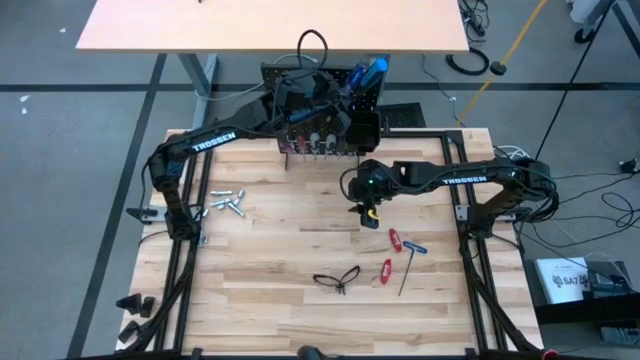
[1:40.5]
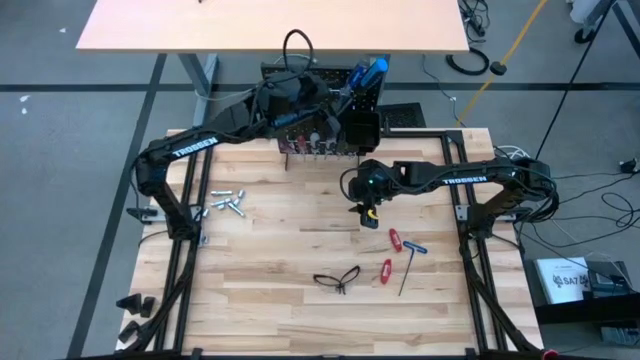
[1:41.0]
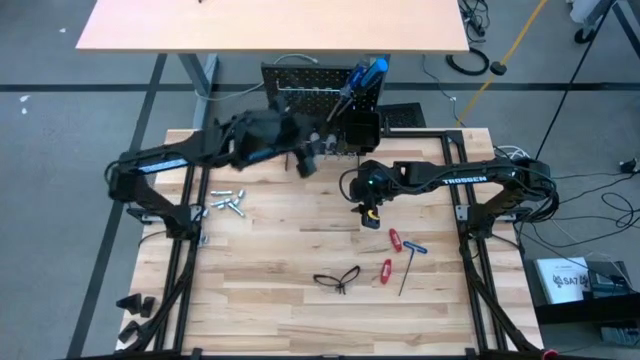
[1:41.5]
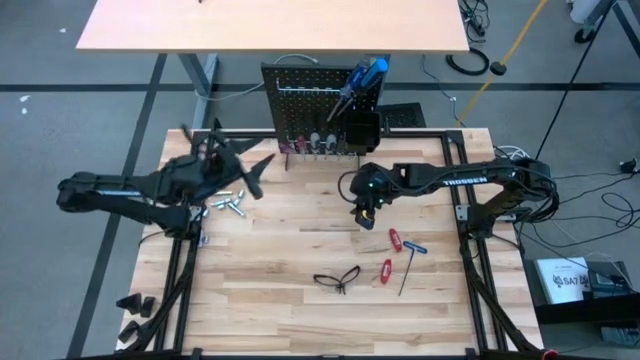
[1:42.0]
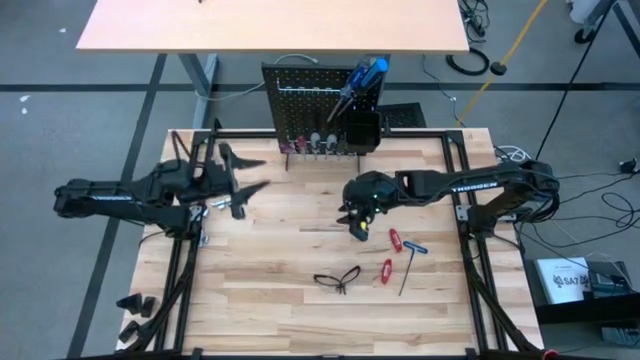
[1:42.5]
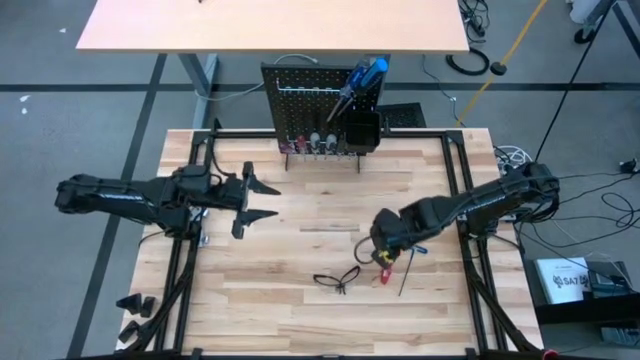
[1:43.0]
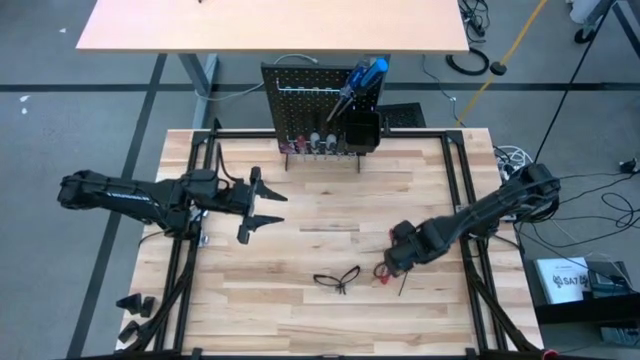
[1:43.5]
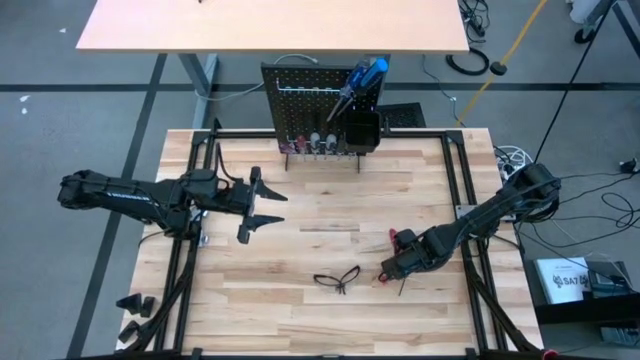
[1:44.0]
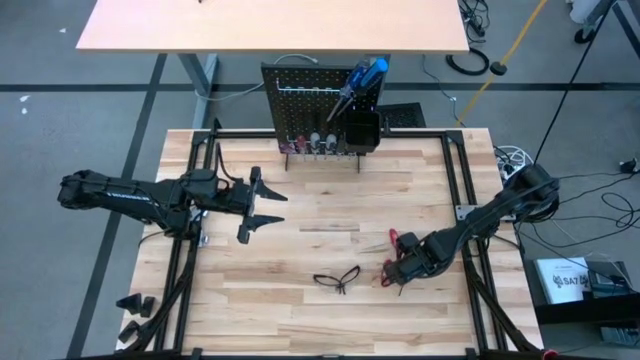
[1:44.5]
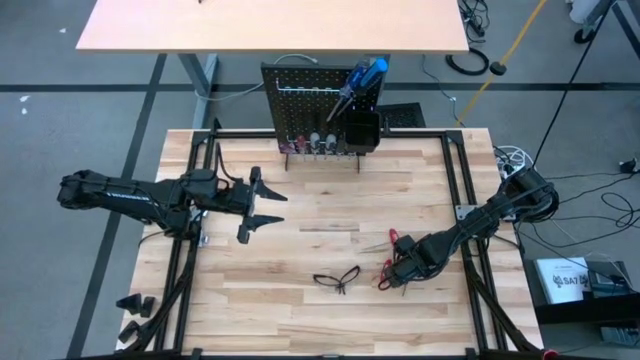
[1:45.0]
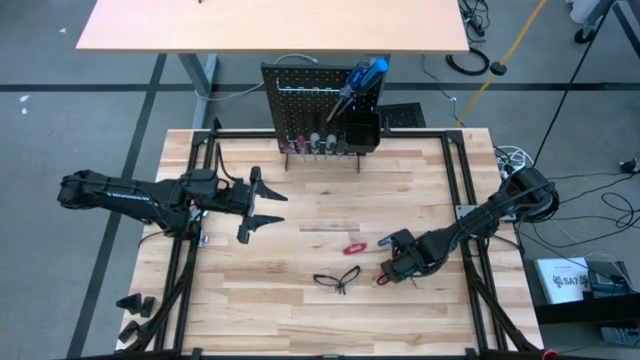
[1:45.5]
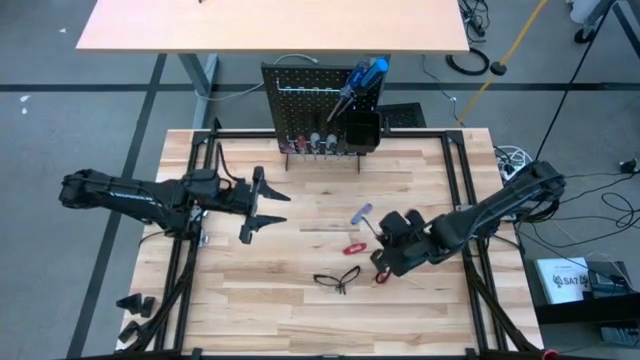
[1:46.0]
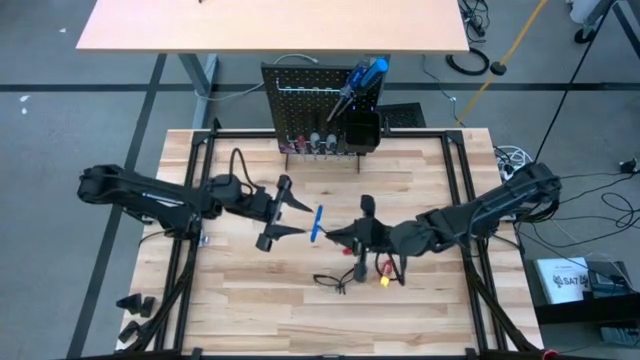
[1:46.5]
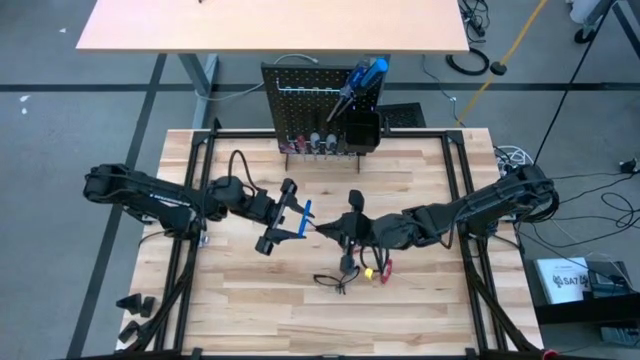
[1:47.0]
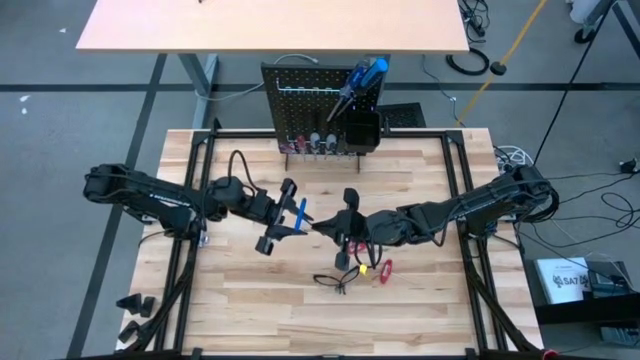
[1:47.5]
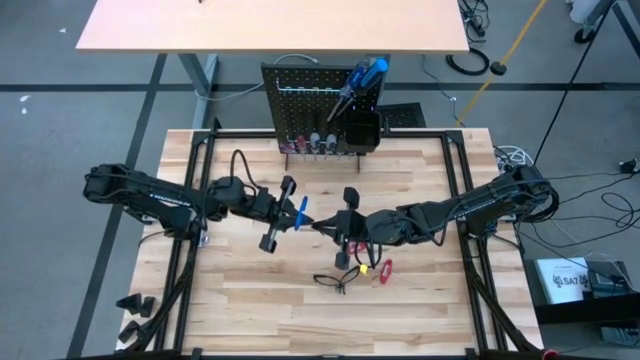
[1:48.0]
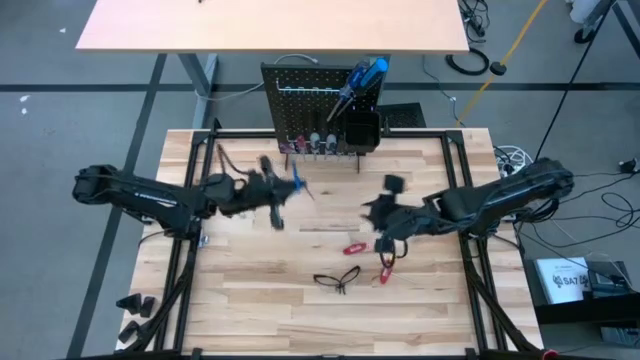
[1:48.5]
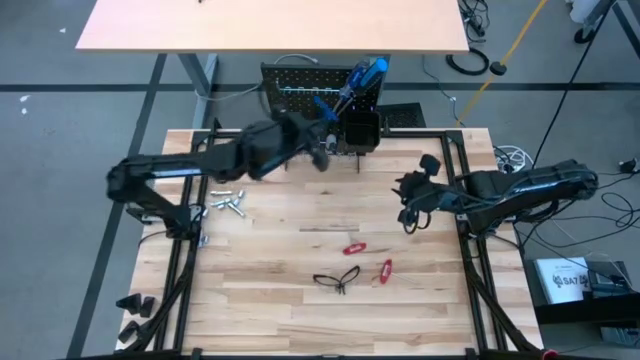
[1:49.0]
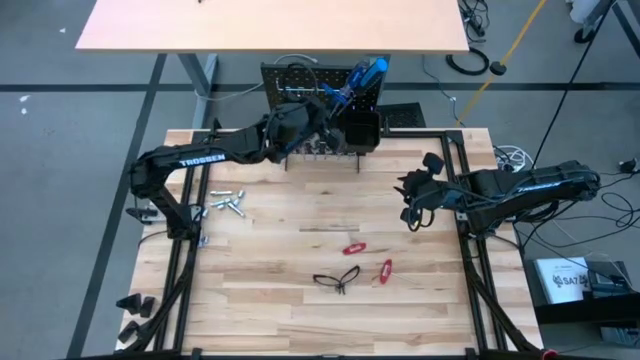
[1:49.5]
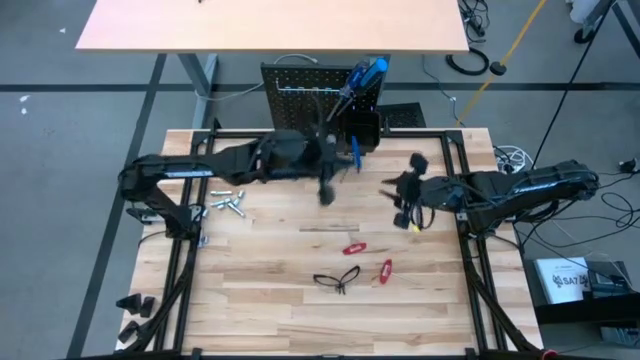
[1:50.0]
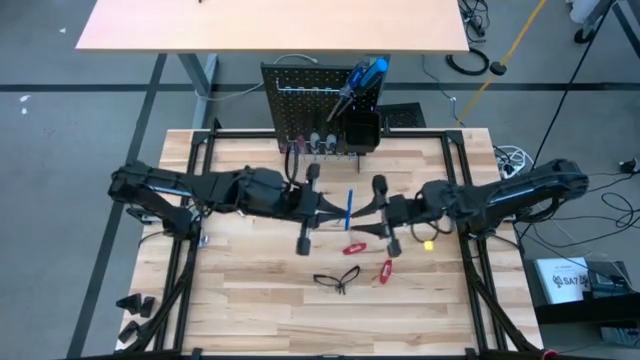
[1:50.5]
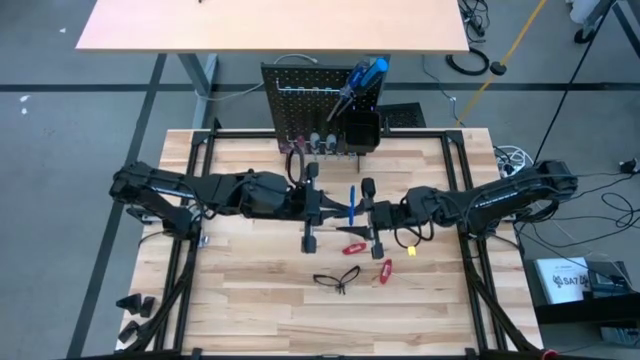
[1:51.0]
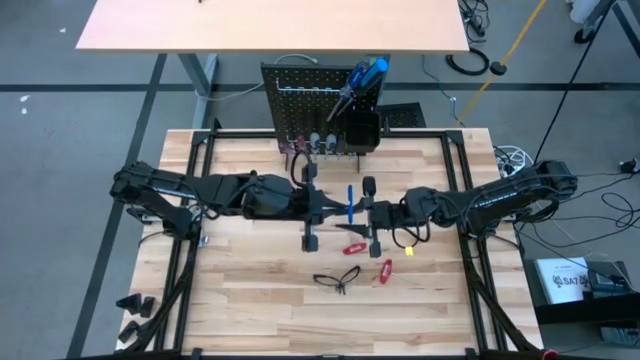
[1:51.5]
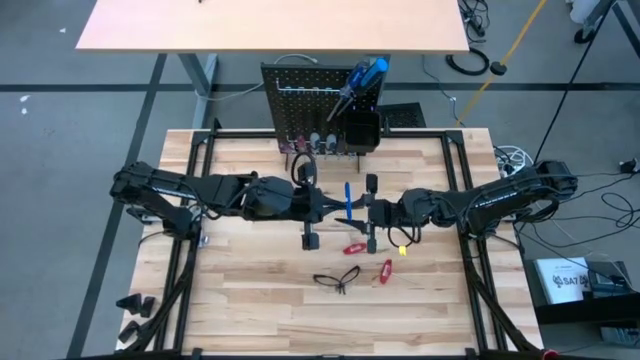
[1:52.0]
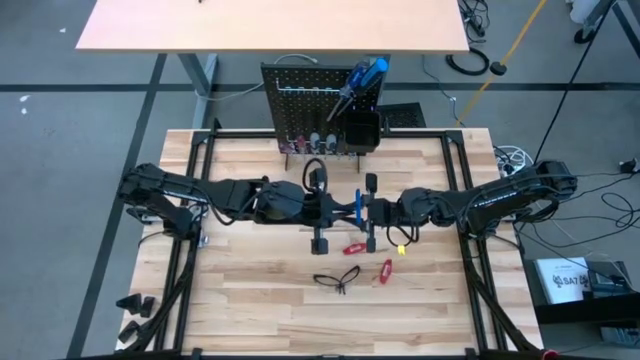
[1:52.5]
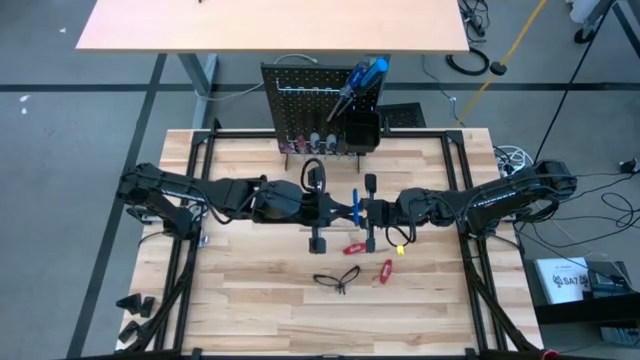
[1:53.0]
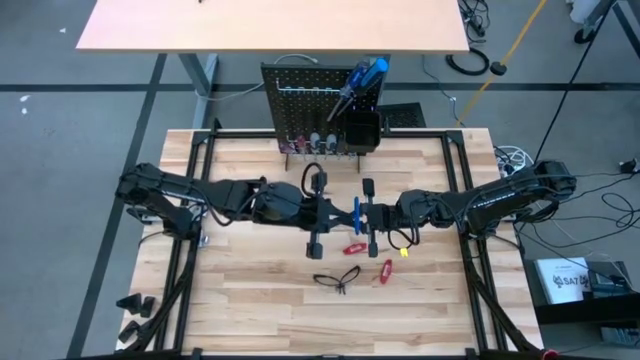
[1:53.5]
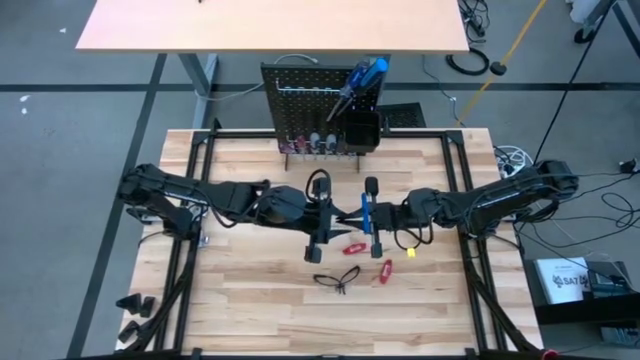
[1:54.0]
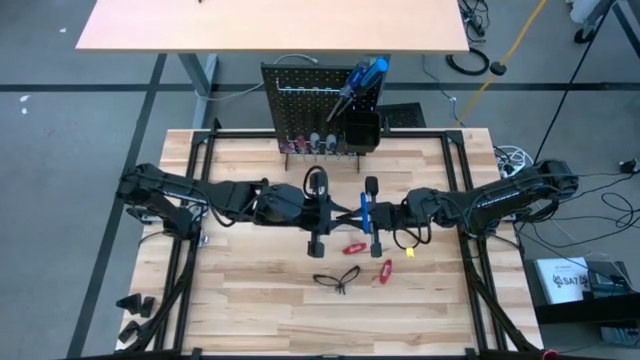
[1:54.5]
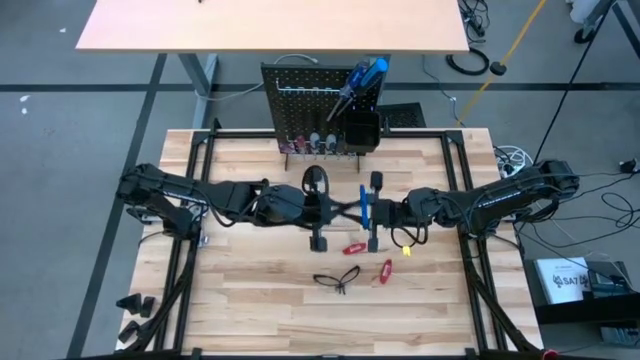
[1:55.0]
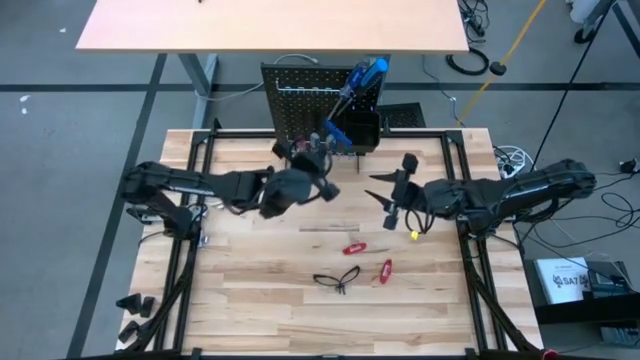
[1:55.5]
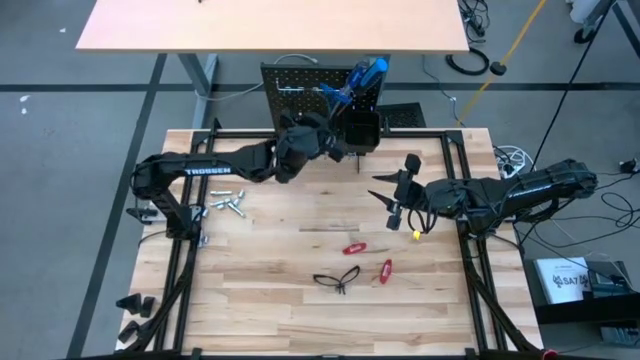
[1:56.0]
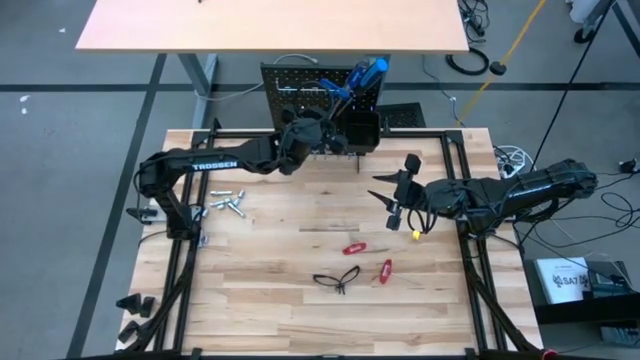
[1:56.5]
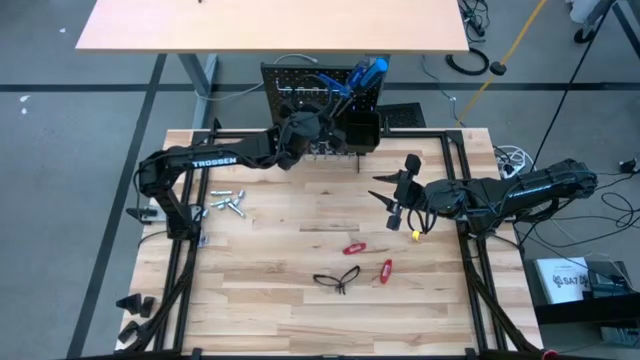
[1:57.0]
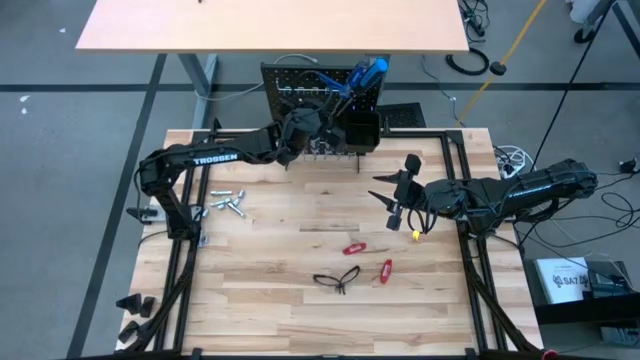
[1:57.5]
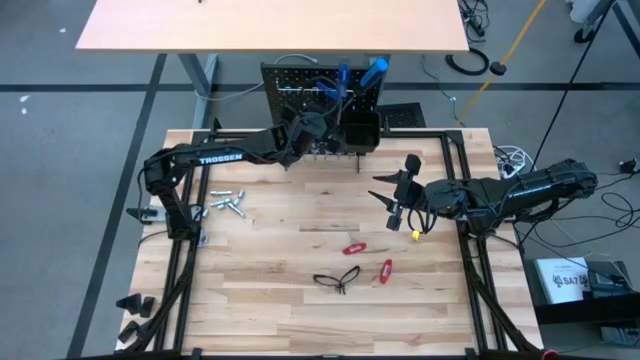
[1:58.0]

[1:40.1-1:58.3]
Task: Hang tools onto peg board
Hang the blue pick tool onto the peg board

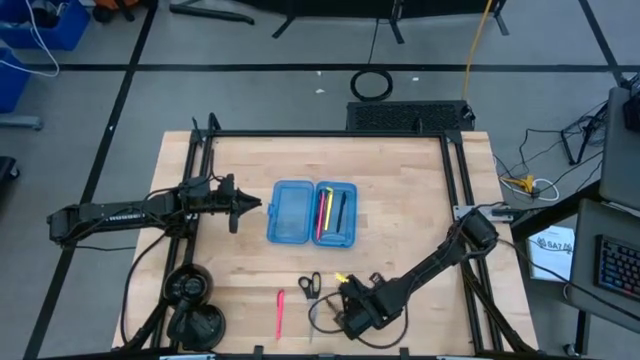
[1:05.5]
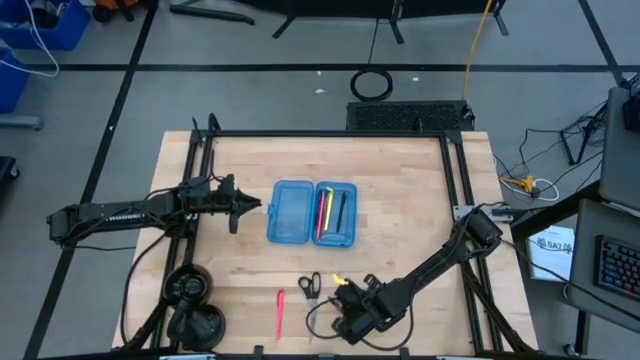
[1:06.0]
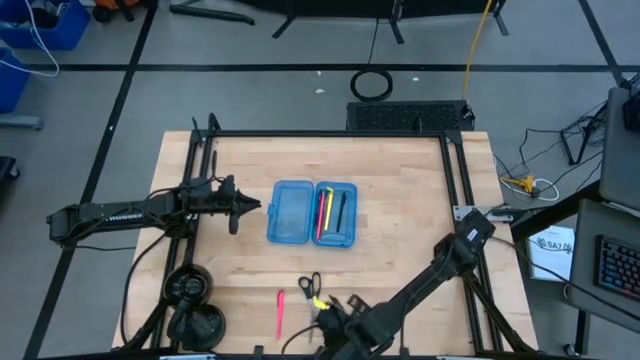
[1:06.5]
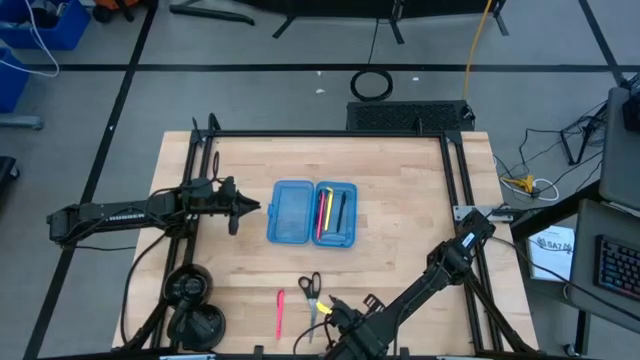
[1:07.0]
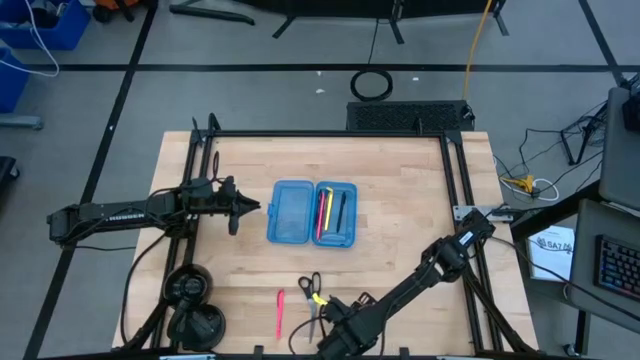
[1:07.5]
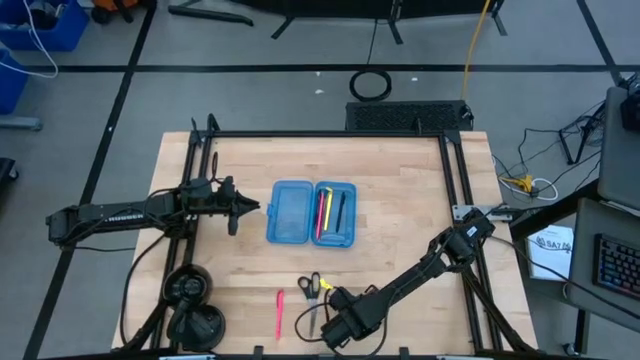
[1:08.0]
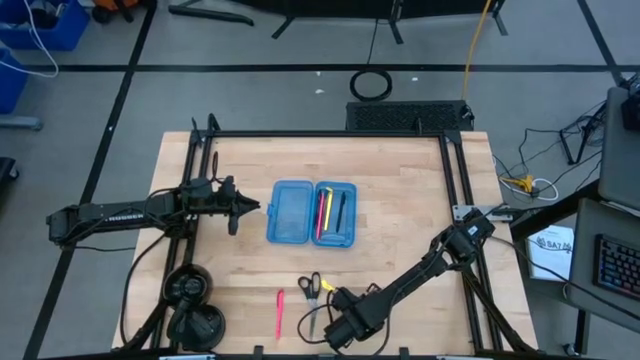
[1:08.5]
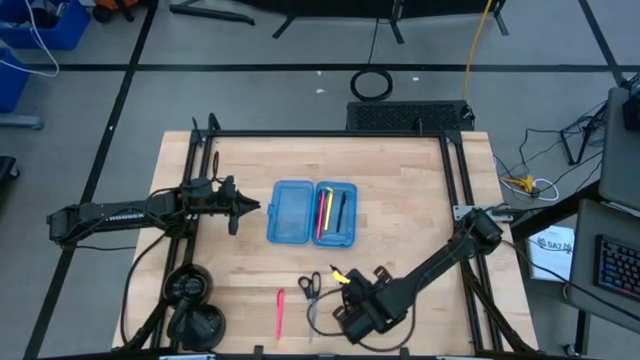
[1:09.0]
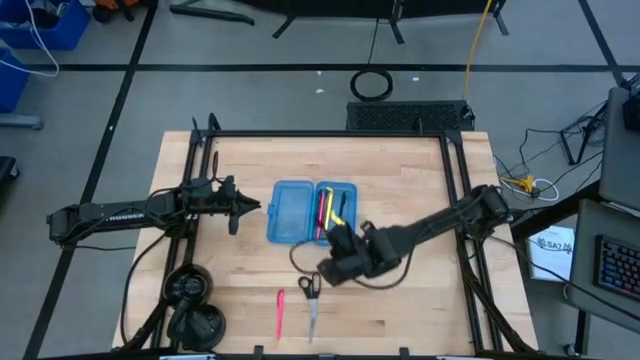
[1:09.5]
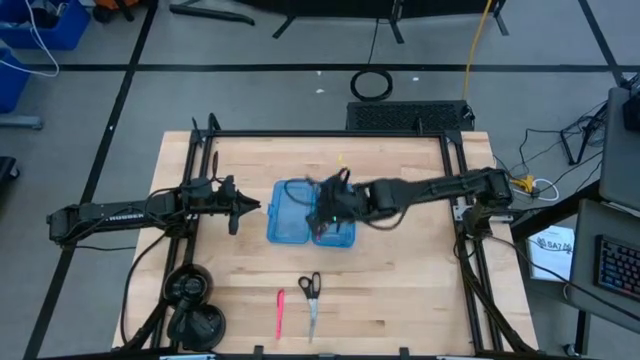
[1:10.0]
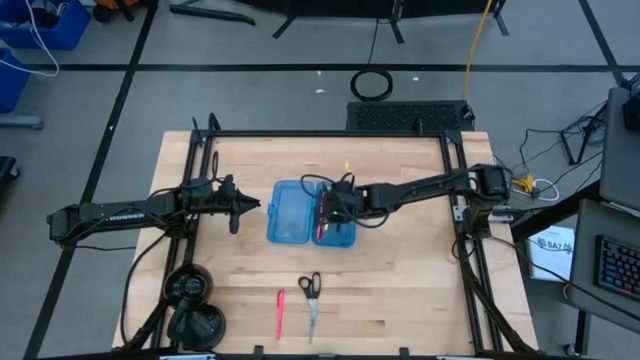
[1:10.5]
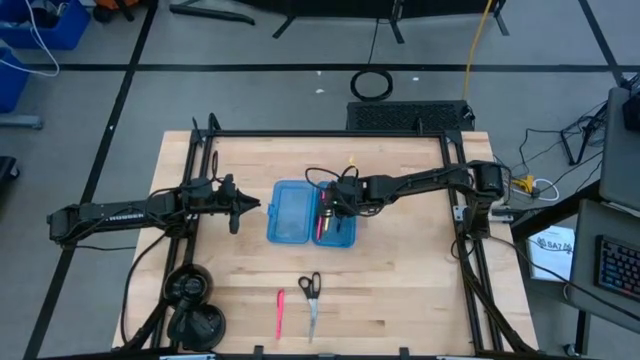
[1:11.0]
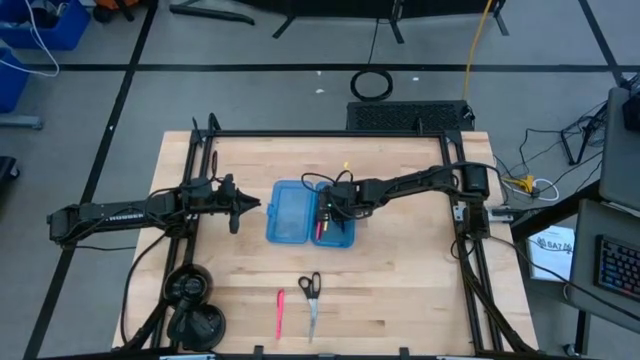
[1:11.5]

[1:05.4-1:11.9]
Task: Pick & place school supplies into a supply box
Put the black pen into the blue supply box
